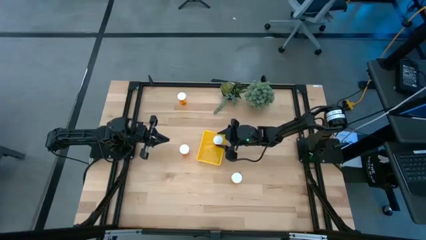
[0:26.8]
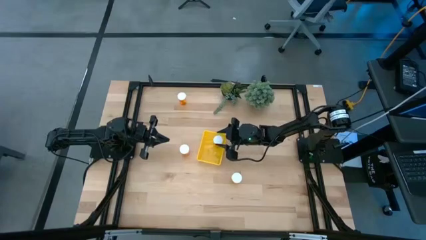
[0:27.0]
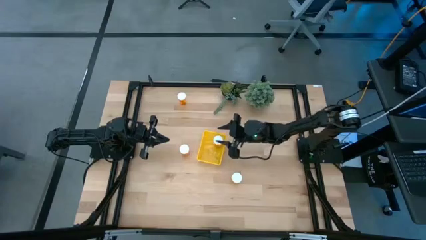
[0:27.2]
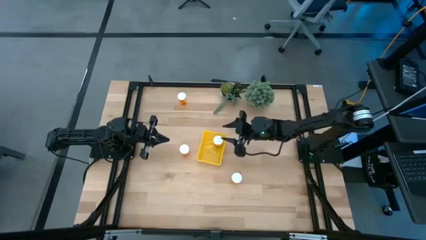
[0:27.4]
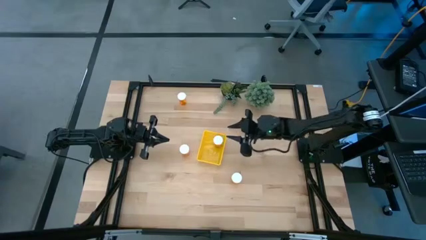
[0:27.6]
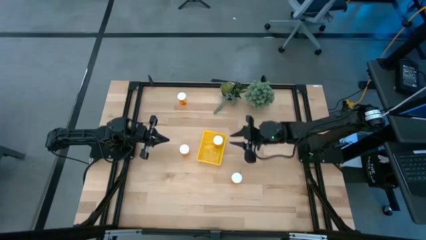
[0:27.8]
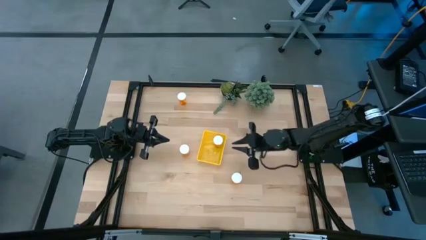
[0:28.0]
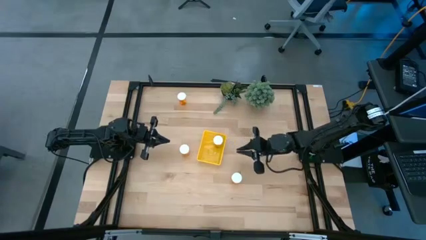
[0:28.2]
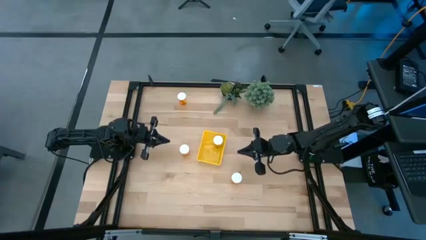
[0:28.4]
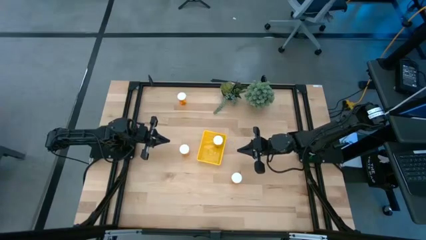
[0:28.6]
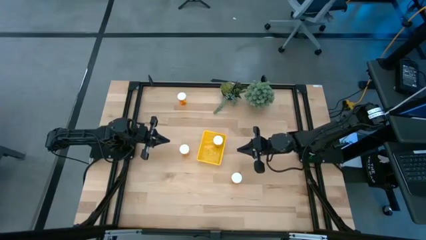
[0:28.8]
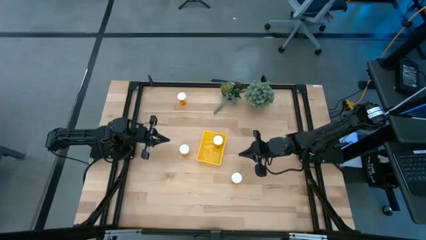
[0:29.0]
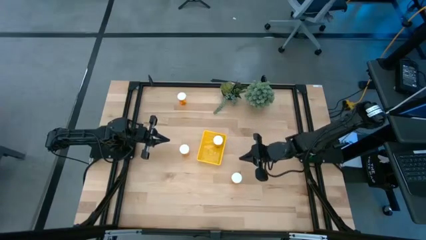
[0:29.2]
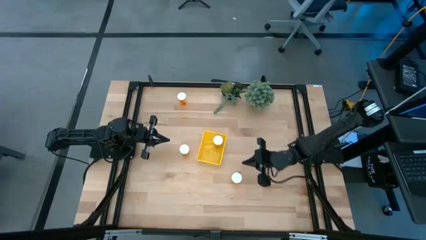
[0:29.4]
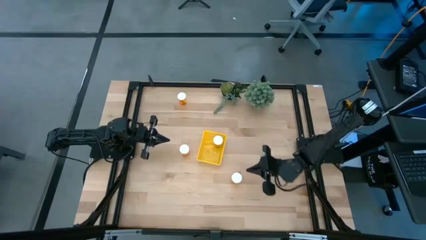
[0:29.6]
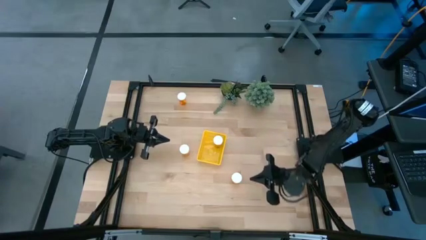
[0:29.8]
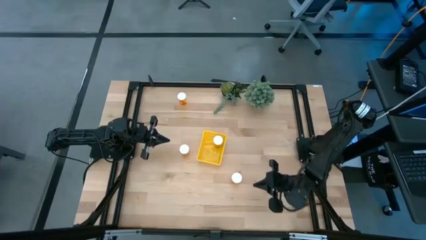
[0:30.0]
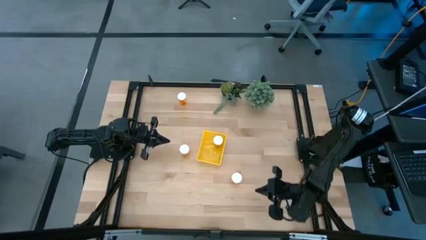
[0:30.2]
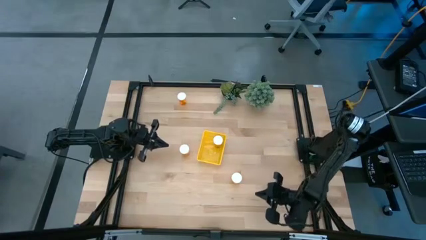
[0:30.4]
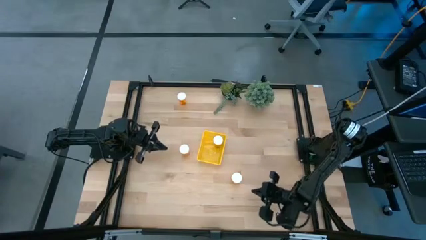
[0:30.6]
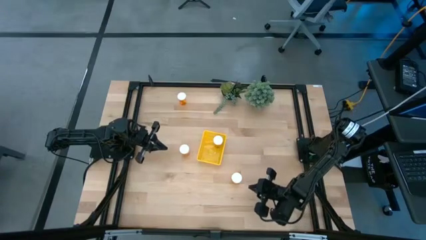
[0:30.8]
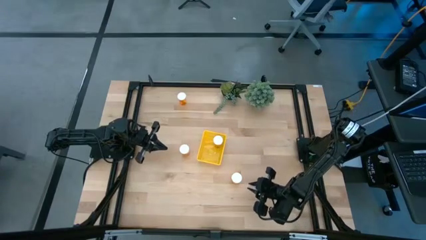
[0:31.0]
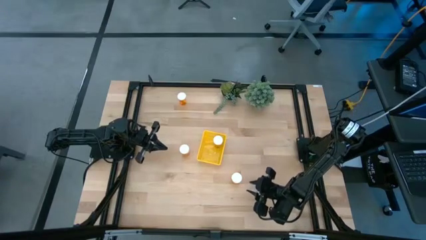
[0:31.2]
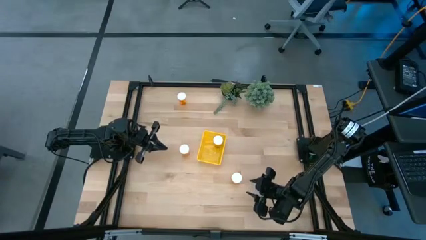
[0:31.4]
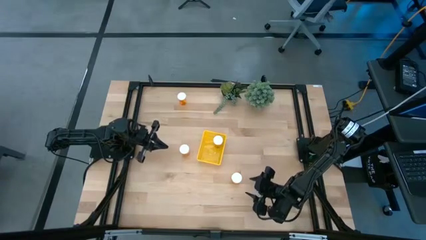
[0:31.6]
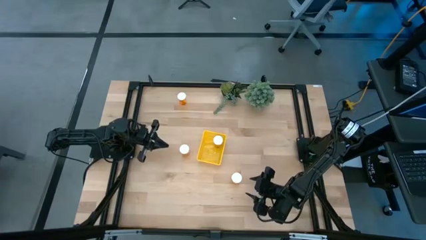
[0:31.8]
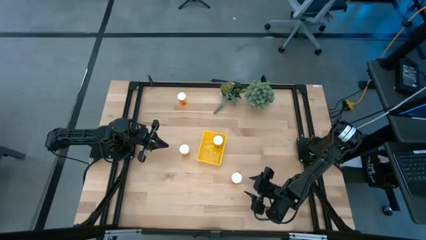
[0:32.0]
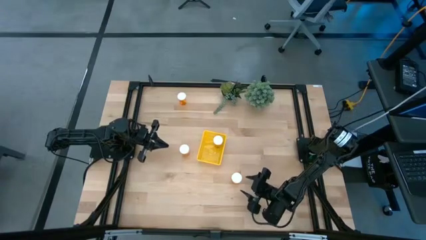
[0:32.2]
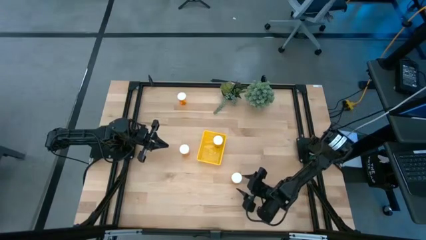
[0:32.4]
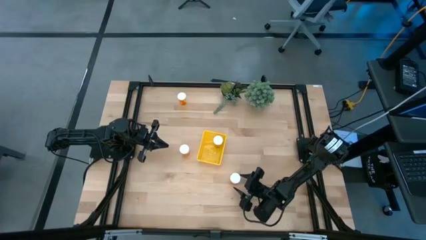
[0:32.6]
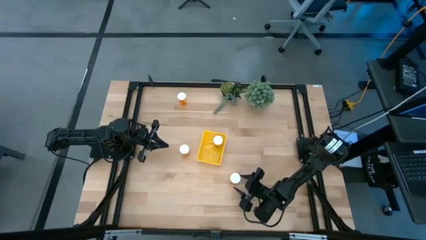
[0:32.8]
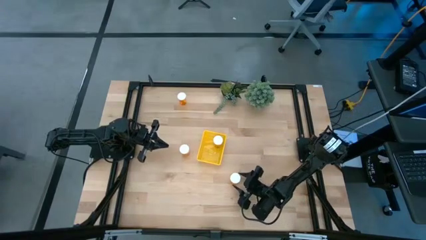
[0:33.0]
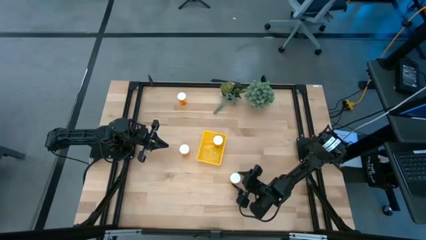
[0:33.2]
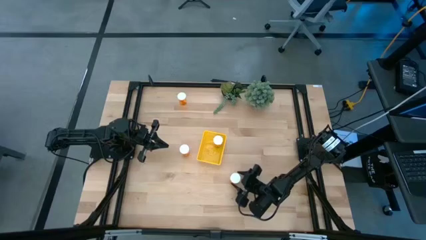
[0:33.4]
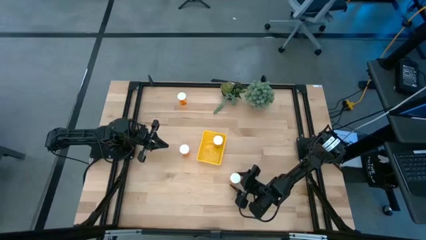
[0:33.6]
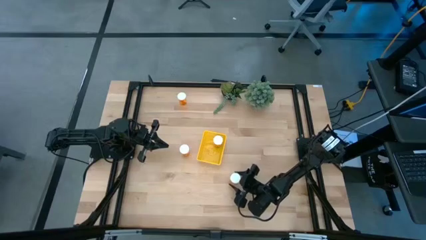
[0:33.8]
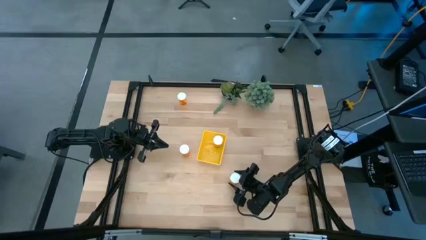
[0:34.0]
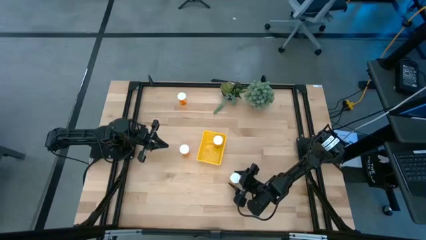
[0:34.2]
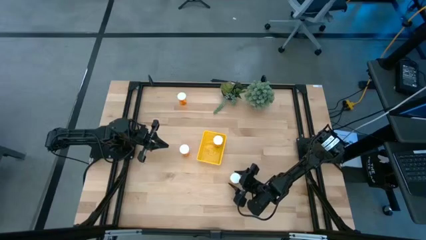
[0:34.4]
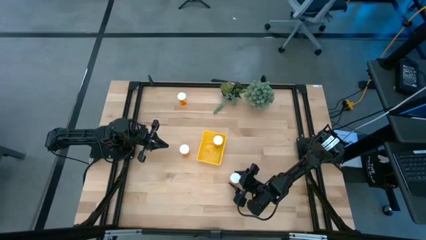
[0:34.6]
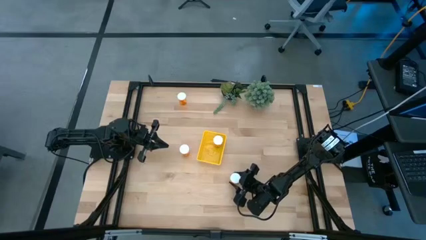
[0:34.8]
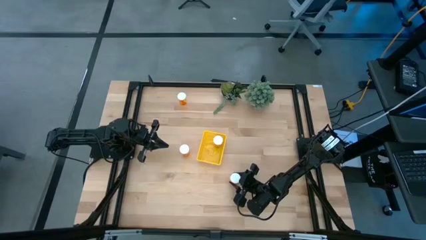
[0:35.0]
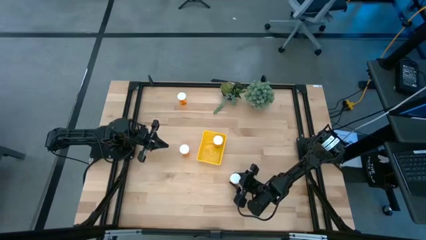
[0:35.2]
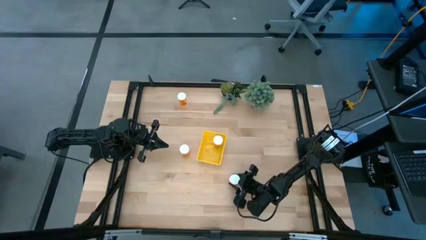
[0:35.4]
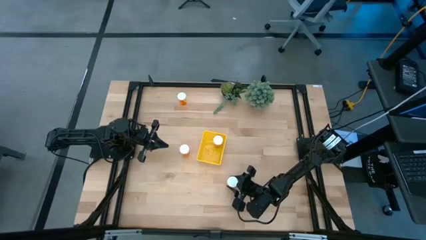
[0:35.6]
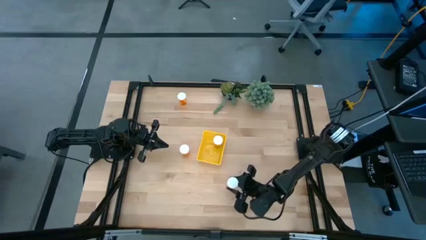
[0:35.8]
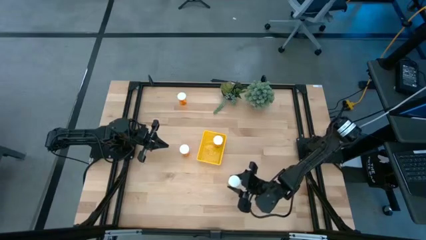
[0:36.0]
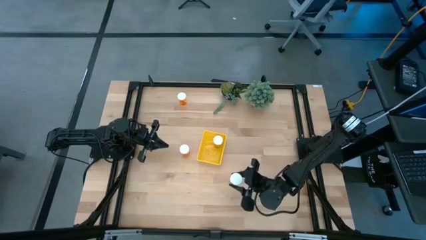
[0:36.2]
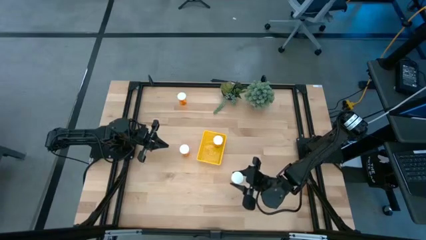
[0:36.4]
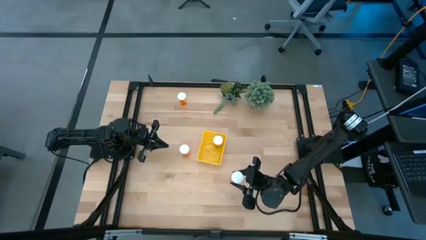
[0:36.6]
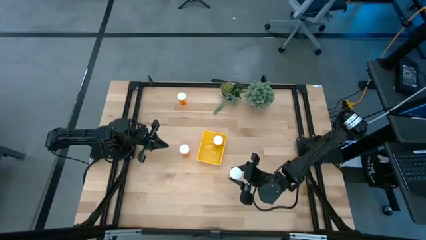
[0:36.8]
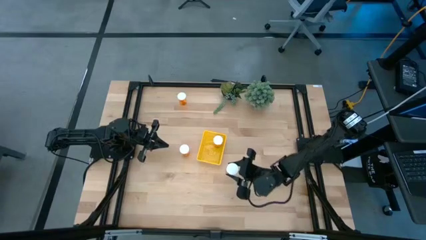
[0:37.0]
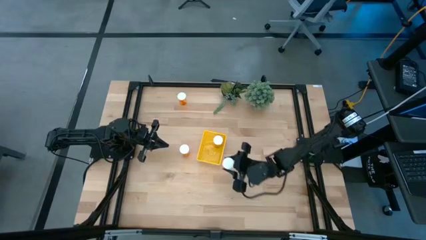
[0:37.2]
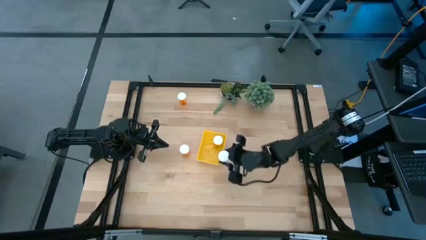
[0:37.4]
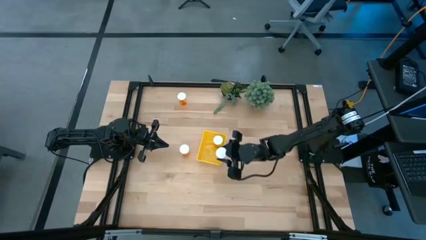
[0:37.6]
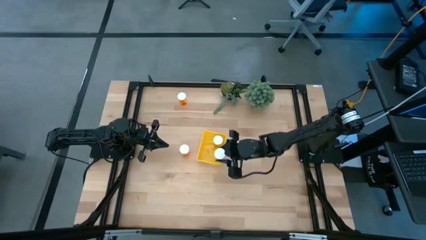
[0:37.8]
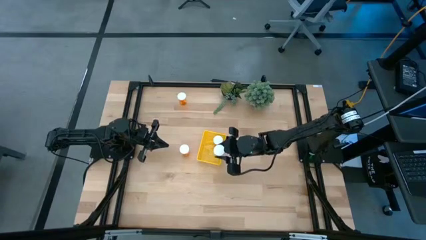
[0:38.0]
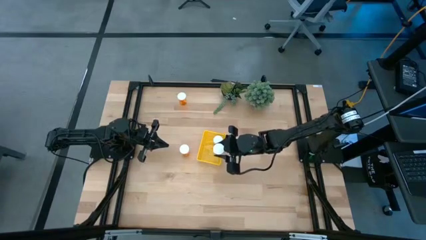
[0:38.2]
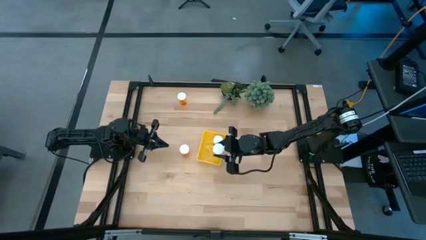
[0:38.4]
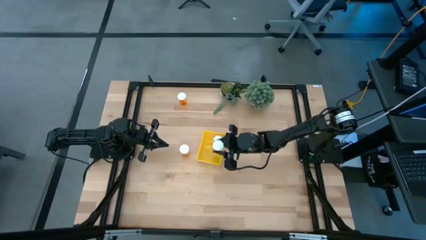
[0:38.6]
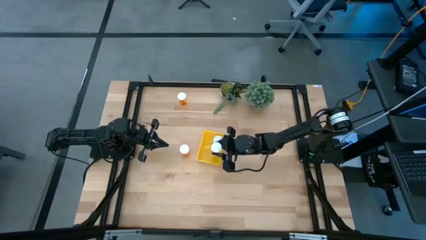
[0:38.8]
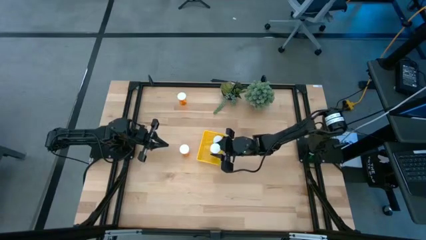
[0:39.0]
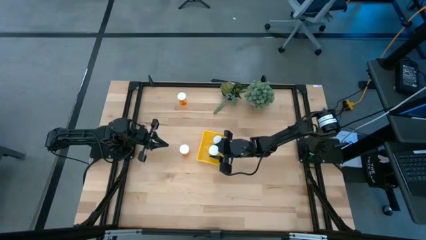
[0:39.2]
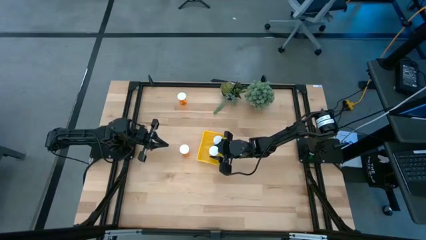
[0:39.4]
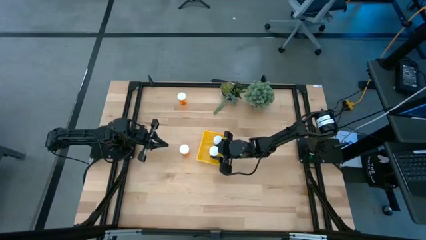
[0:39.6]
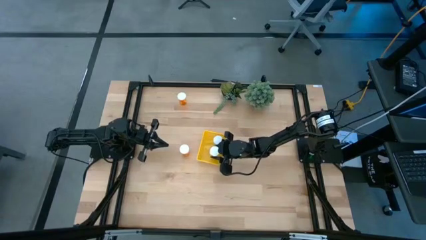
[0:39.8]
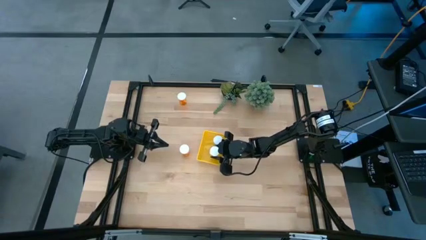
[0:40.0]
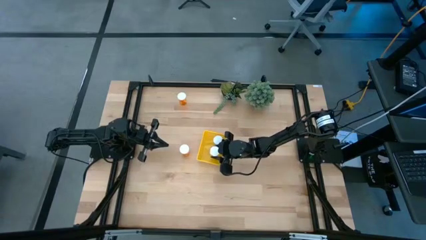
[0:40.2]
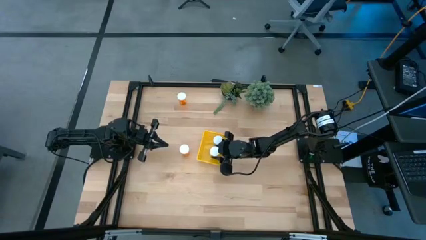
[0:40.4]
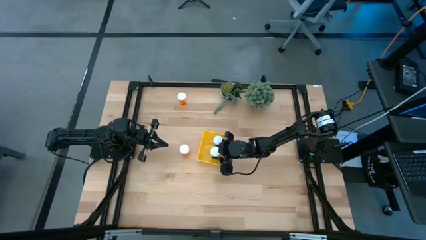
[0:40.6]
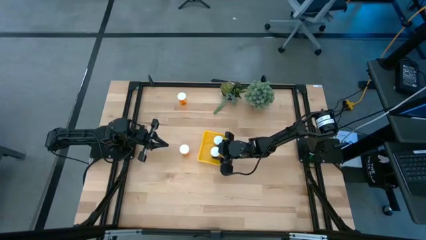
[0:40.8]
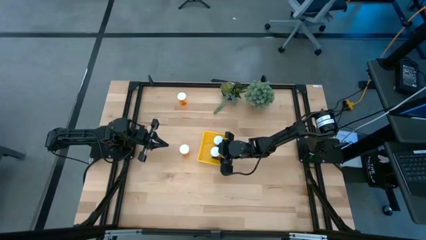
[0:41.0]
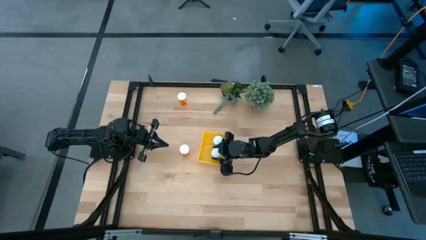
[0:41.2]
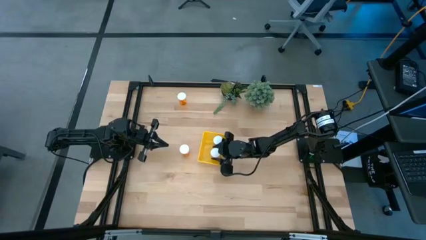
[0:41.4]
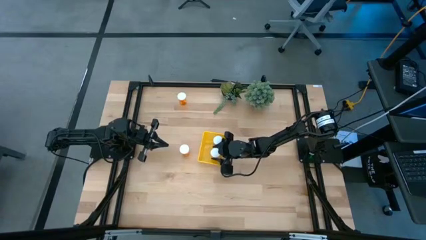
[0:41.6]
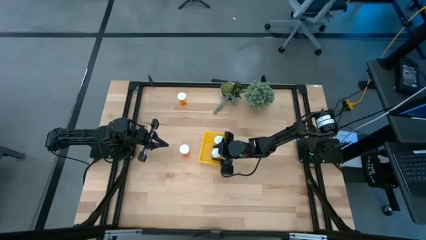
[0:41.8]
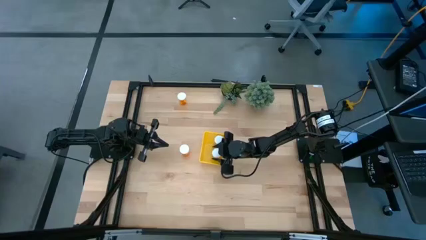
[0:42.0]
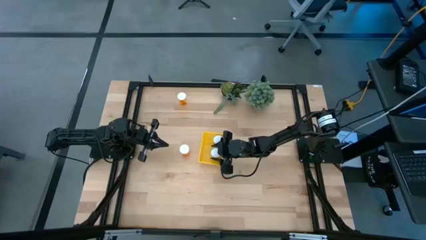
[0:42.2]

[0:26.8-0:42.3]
Task: Pick and place pill bottles into a basket
Put the orange pill bottle into the yellow bin

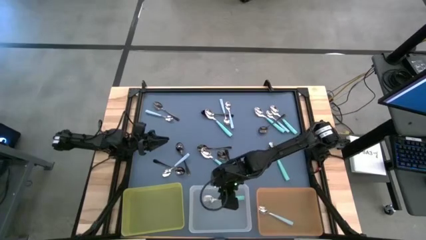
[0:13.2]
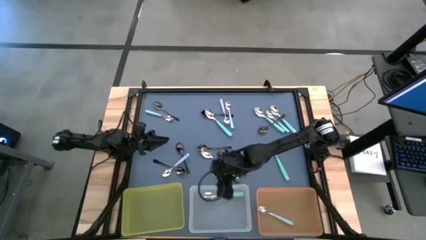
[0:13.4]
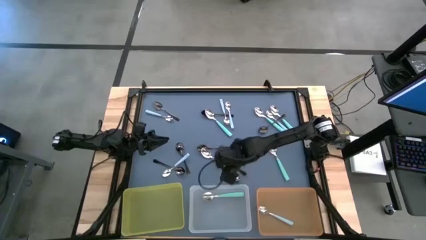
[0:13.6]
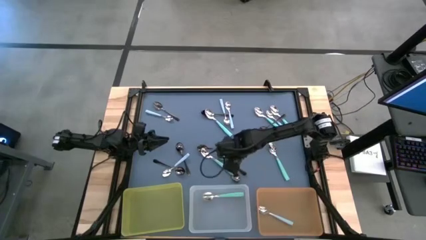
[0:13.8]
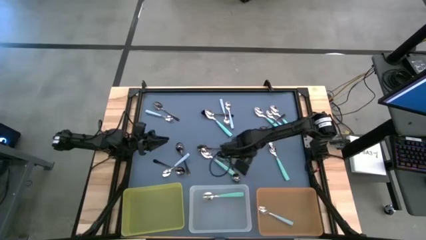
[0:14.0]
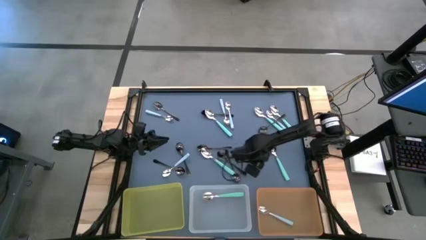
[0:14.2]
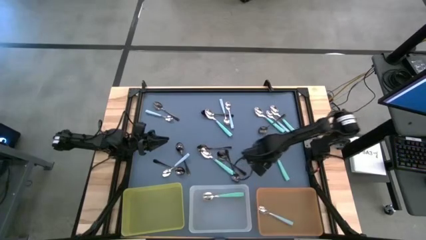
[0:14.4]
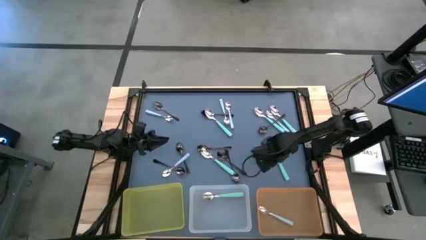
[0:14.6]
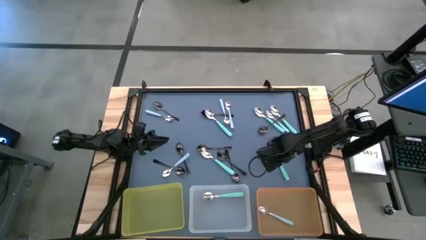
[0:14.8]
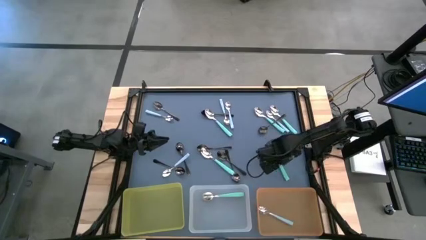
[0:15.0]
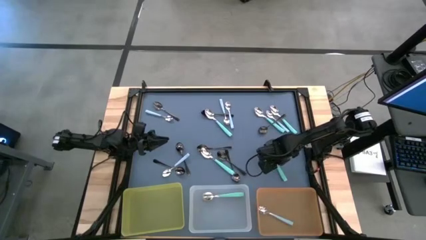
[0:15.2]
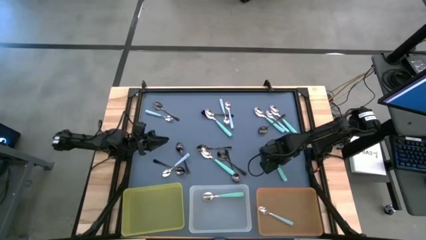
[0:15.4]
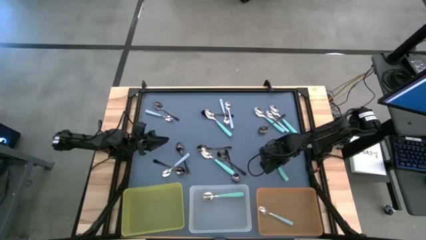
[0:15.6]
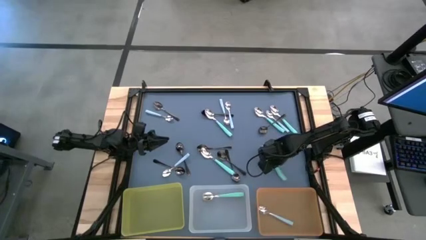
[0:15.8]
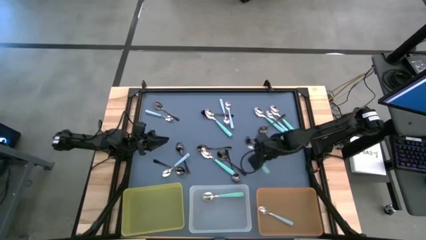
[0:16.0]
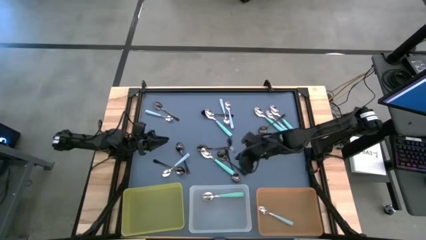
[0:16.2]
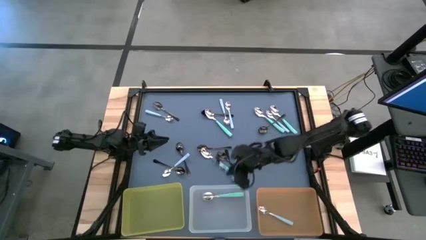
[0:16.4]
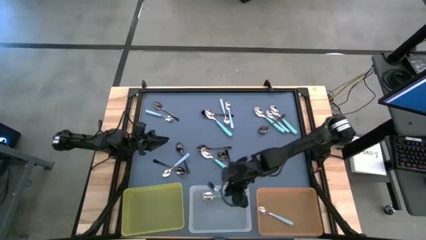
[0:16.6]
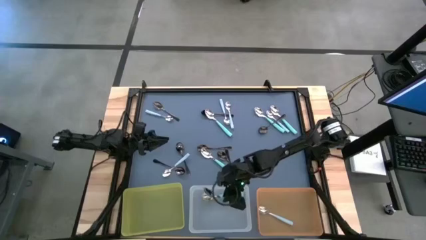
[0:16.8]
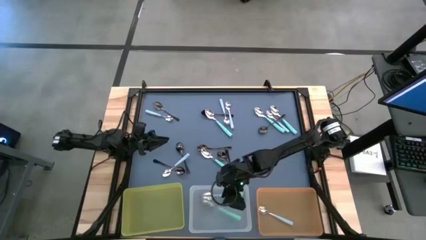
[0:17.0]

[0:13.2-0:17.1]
Task: Sort silverware by color (type)
Put the green spoon into the transparent bin
